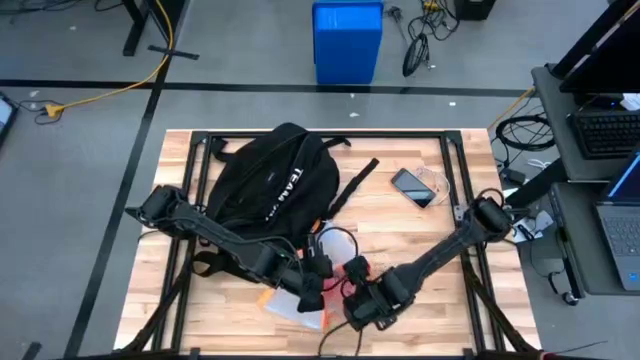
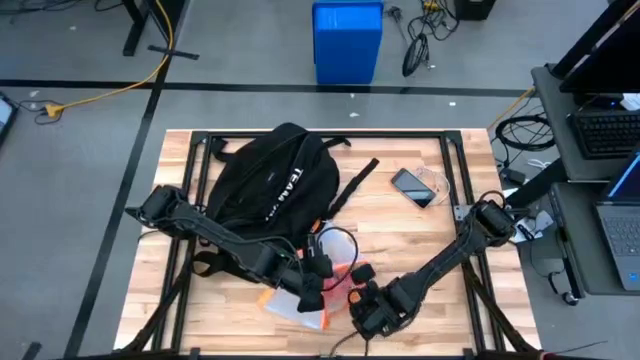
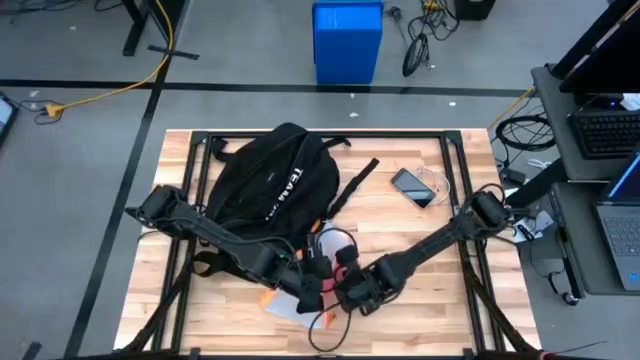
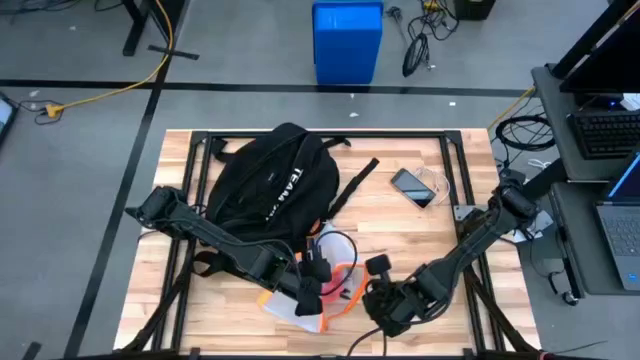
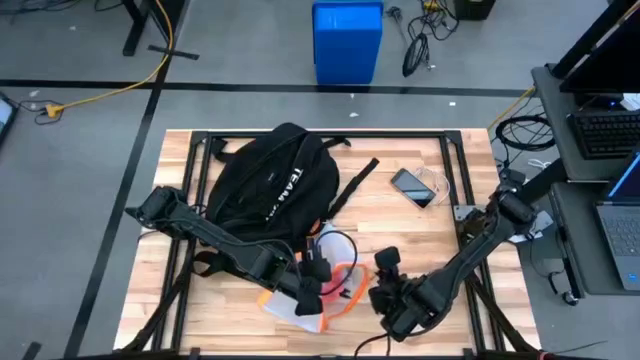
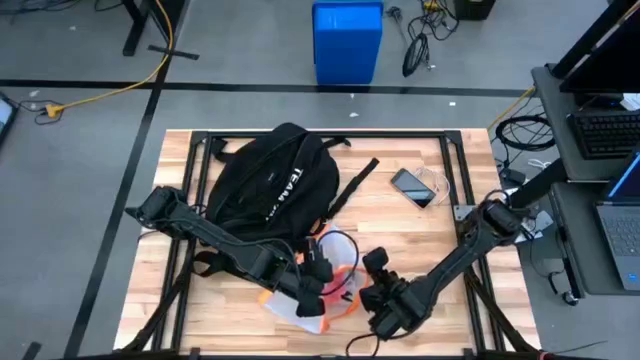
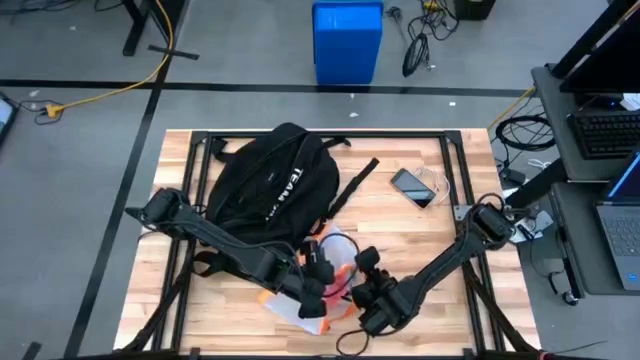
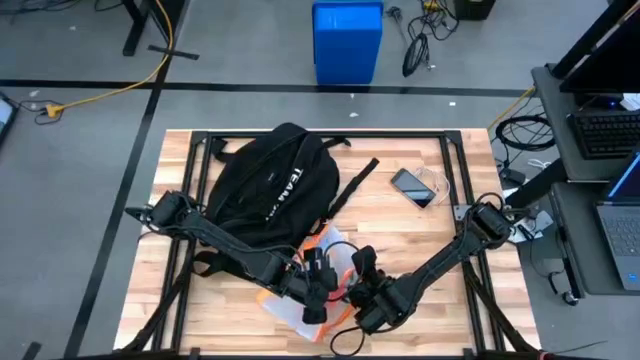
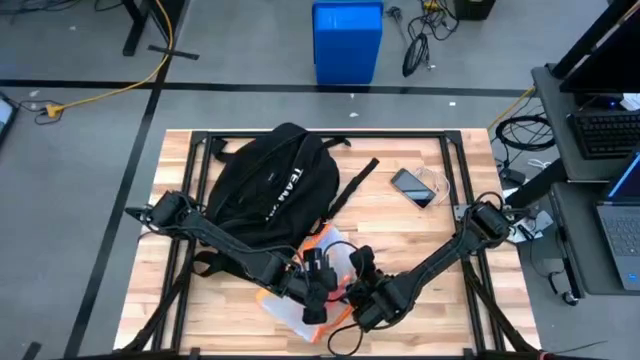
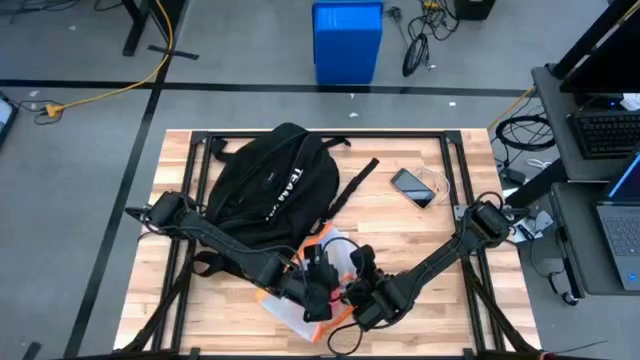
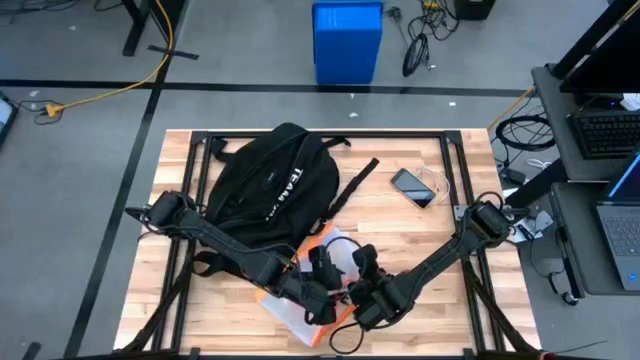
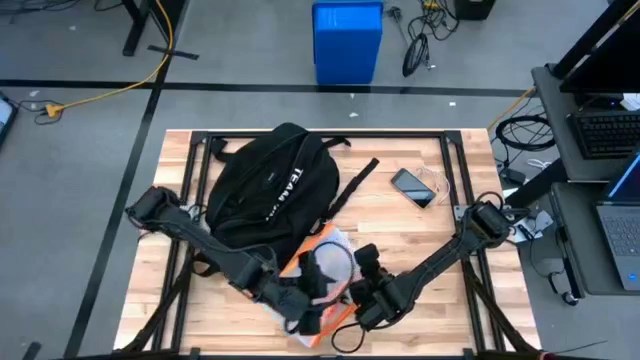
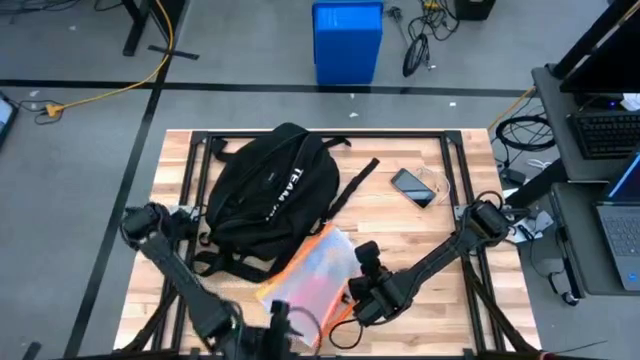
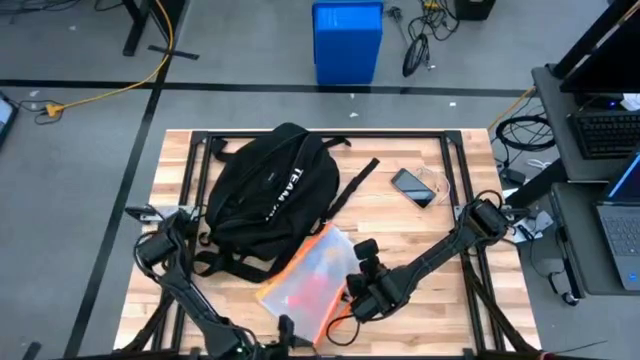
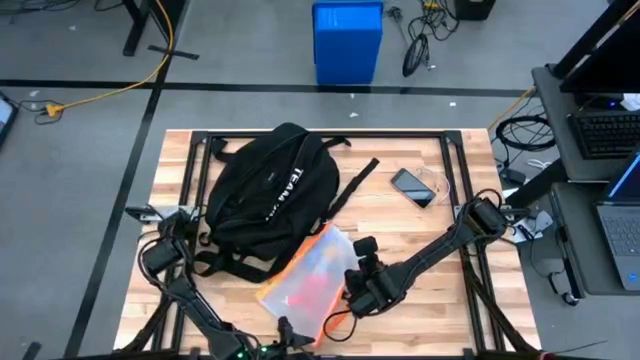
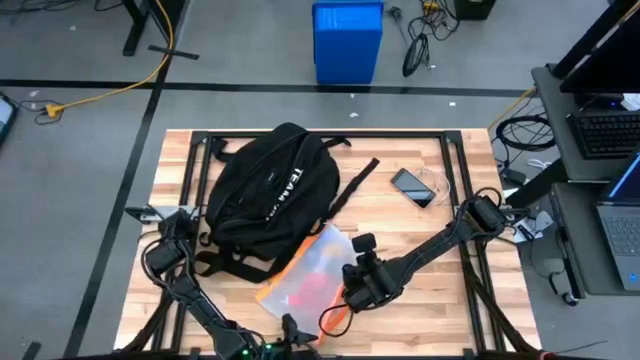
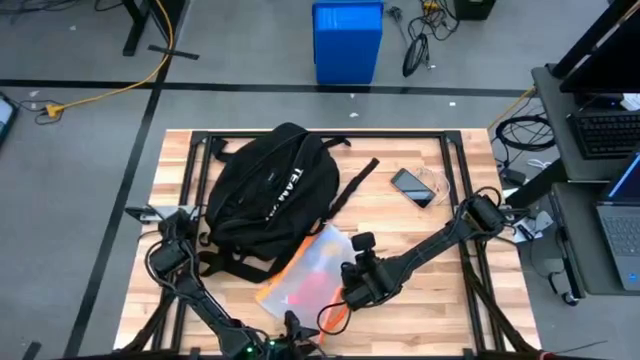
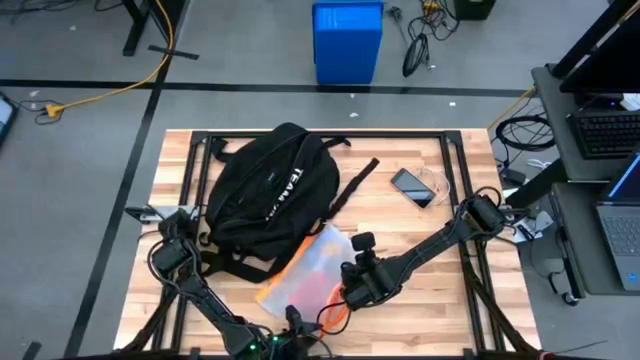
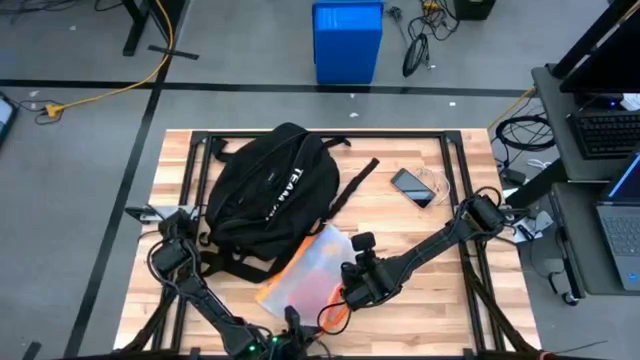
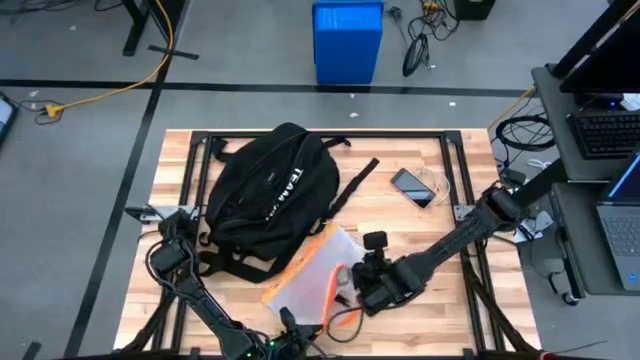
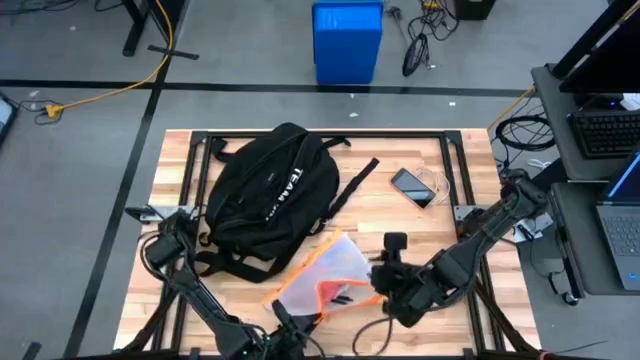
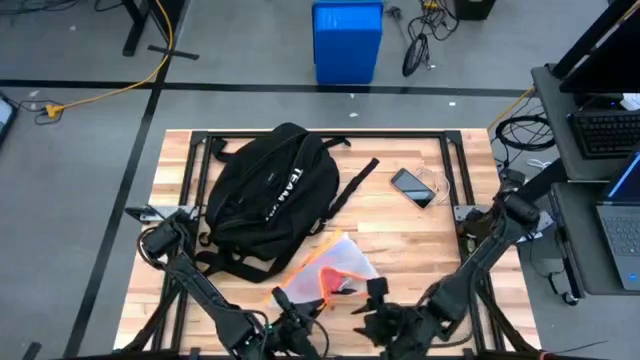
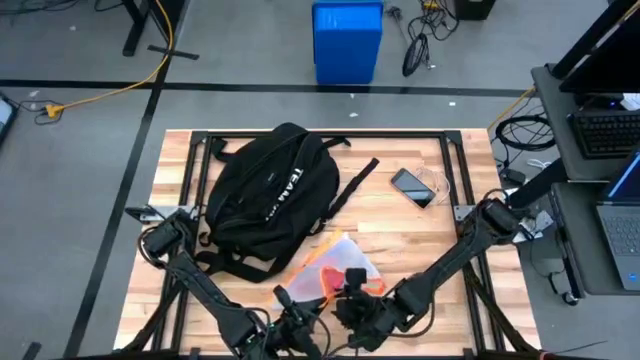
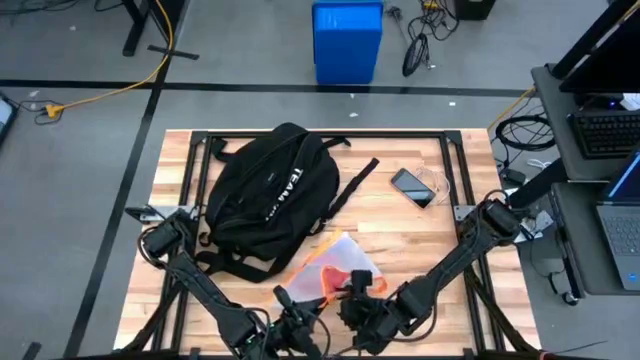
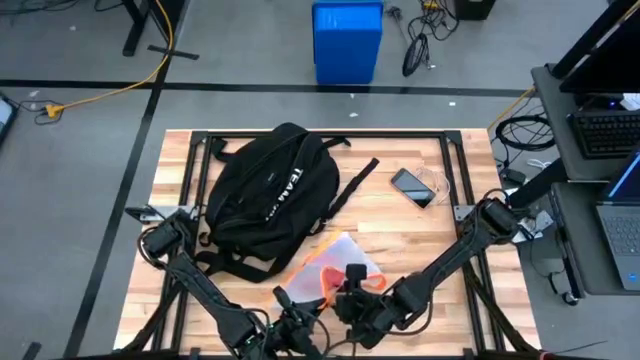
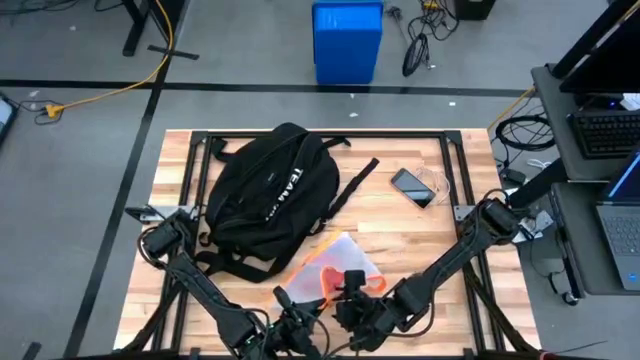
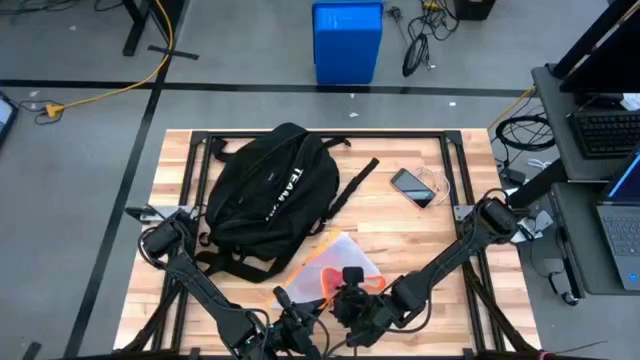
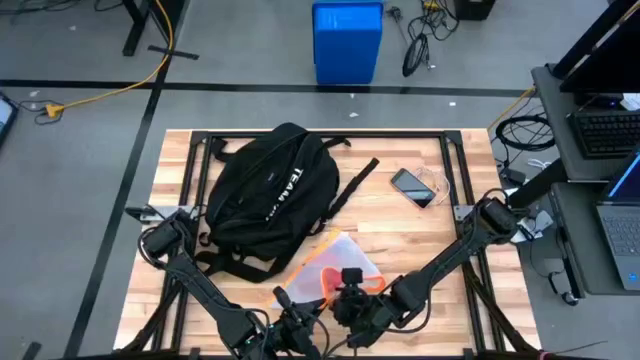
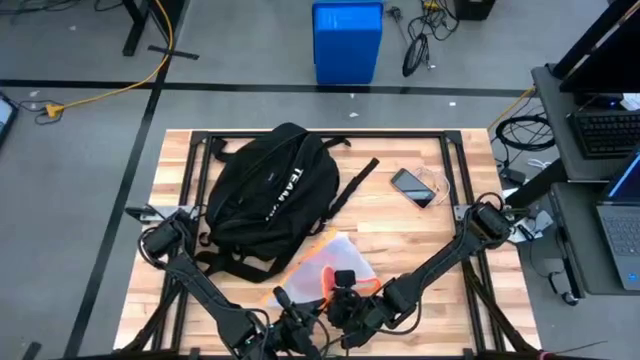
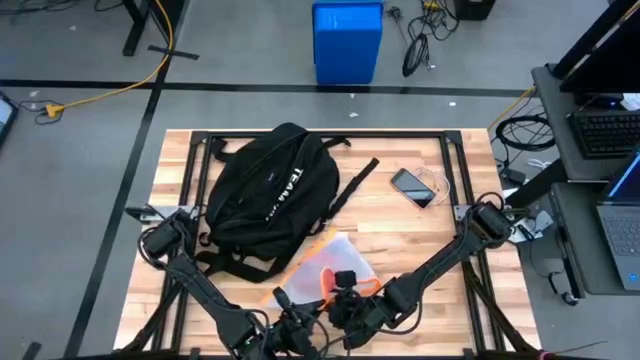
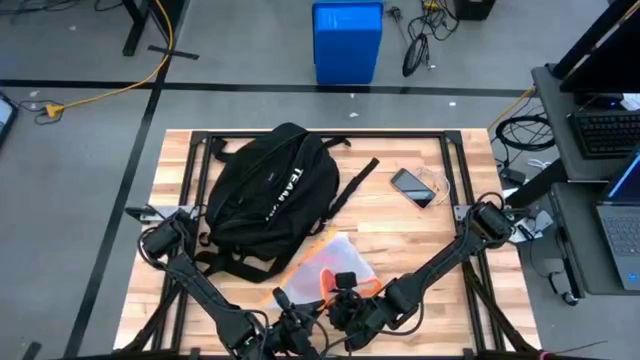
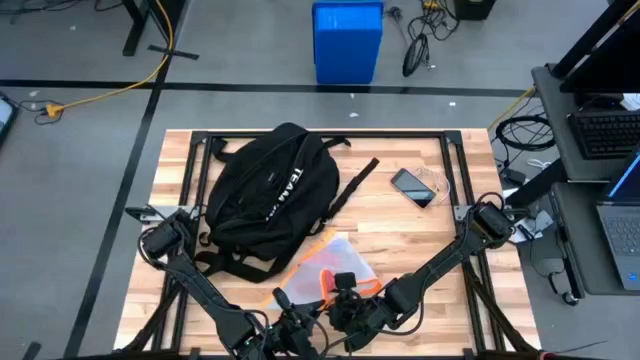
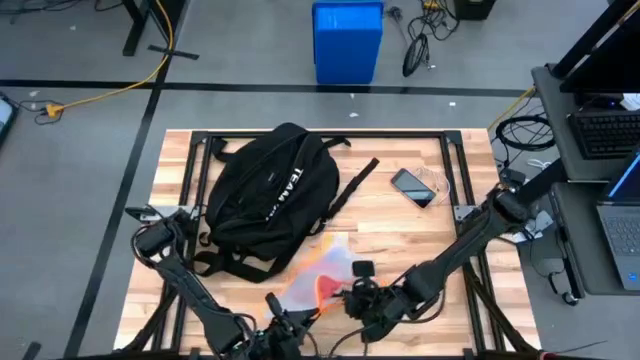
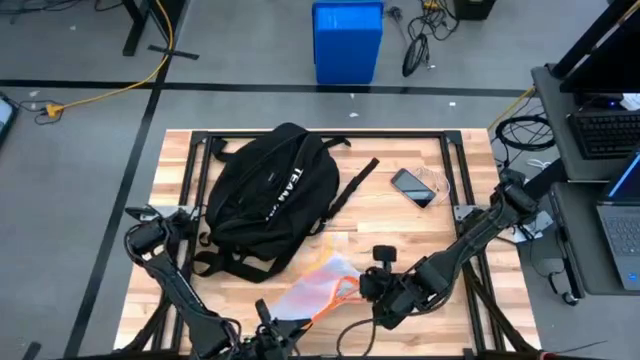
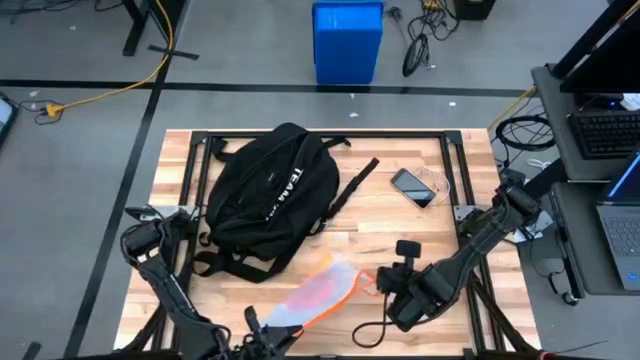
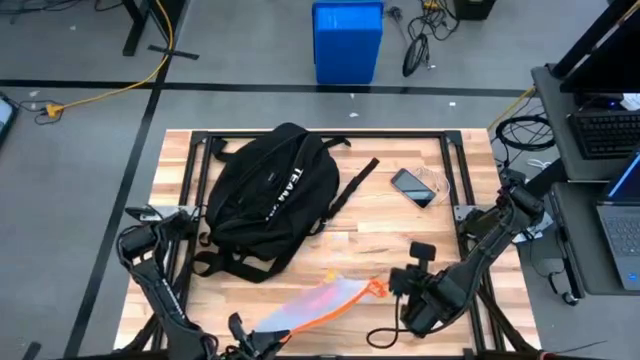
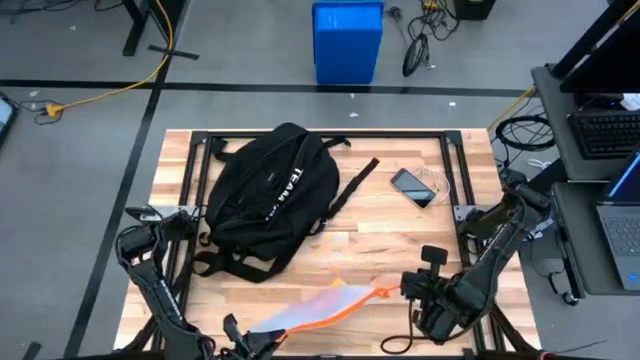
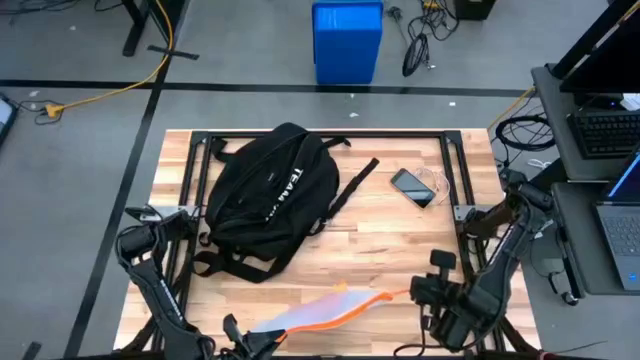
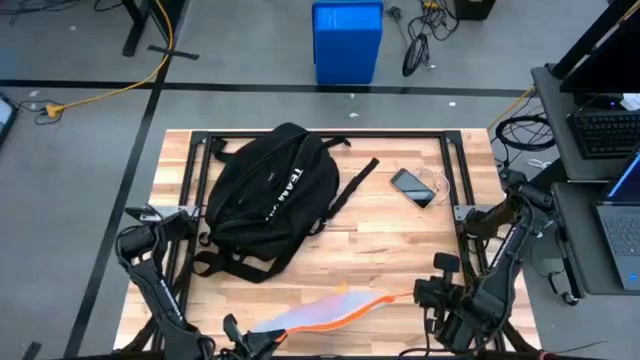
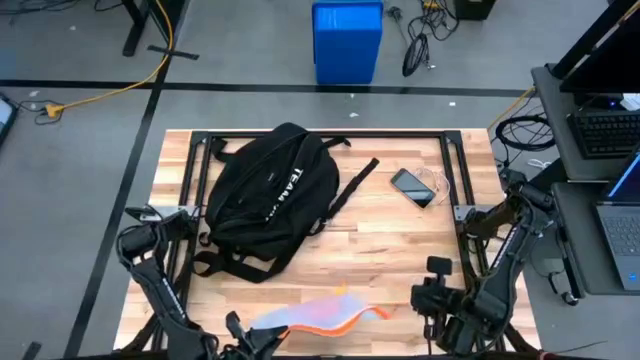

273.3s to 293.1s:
Task: Unpack backpack
Close the orange zip bag

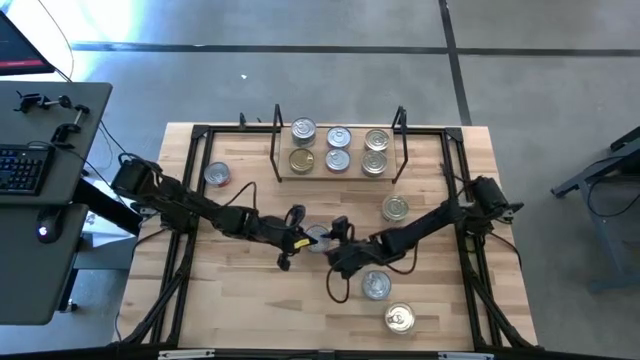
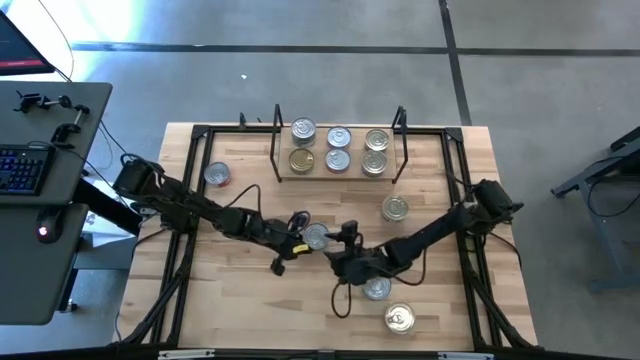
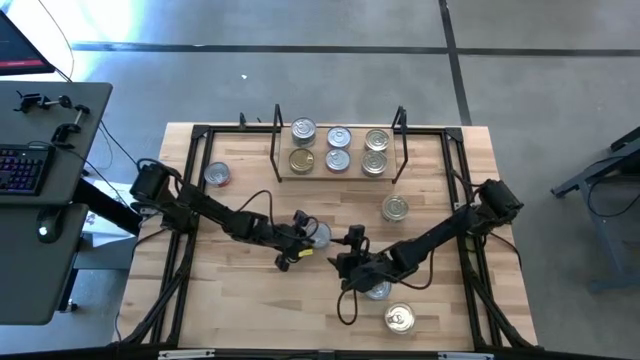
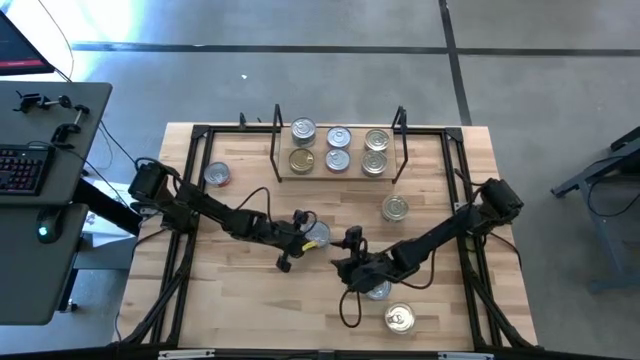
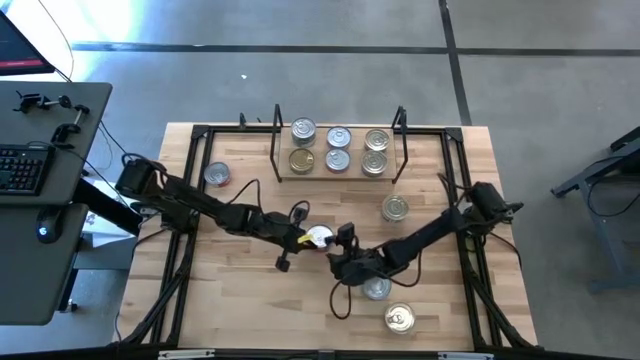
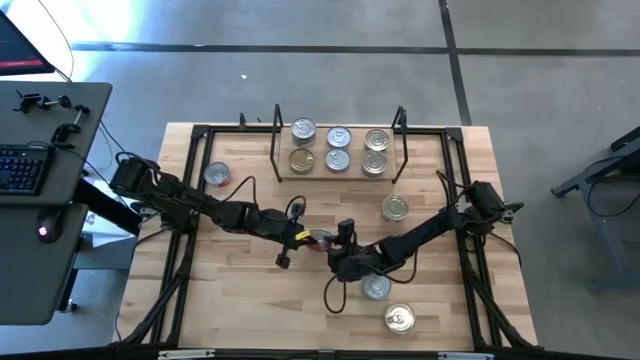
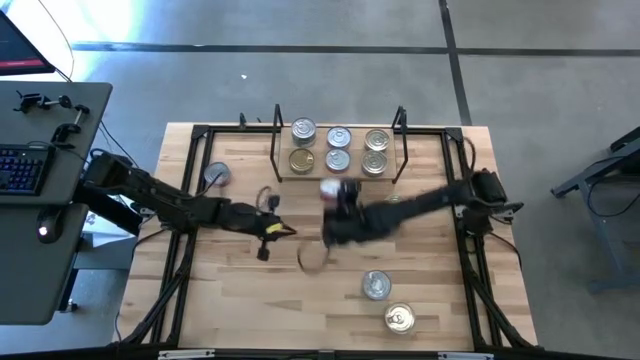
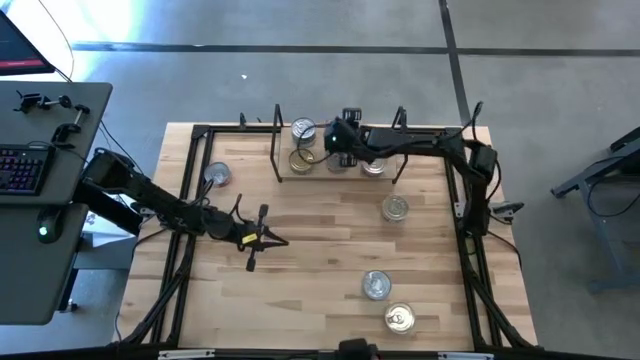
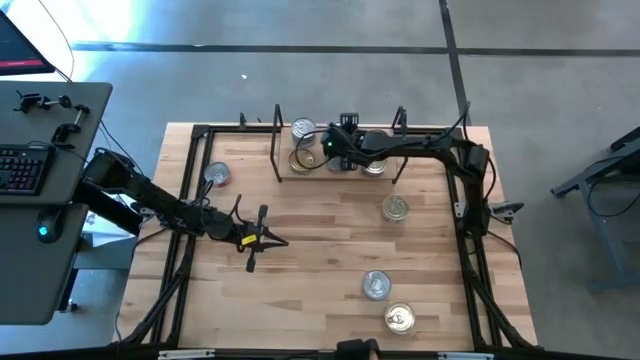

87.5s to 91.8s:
Task: Stack canned seafood by type on shelf
Stack the right red tuna can on top of the red tuna can on the shelf
